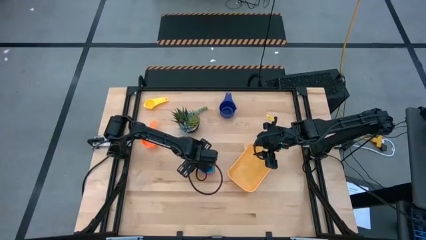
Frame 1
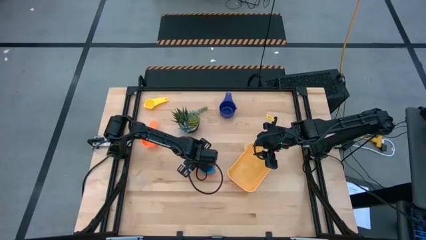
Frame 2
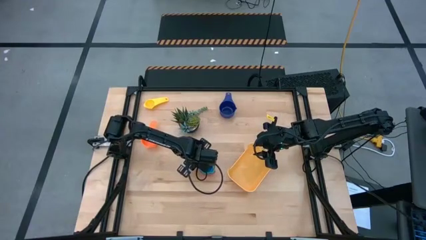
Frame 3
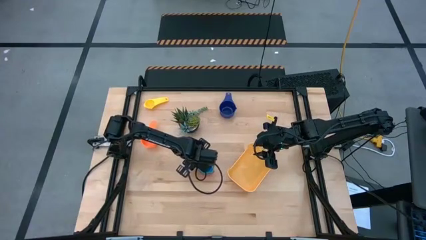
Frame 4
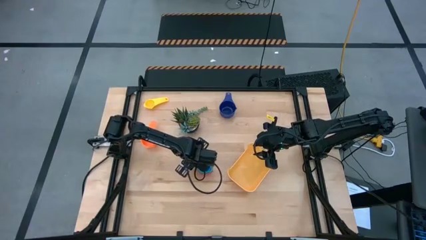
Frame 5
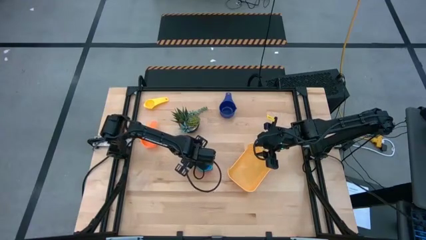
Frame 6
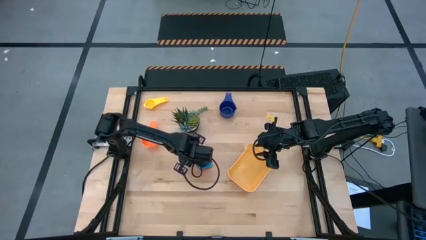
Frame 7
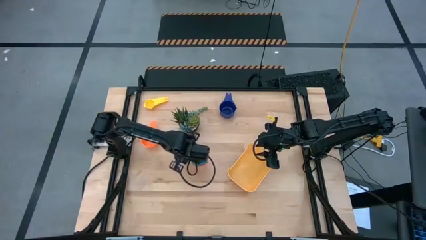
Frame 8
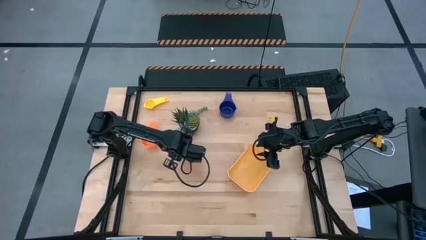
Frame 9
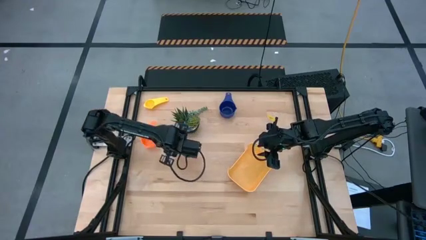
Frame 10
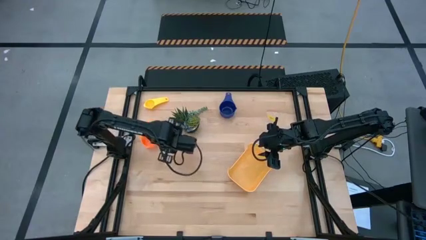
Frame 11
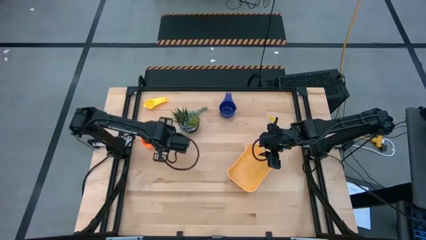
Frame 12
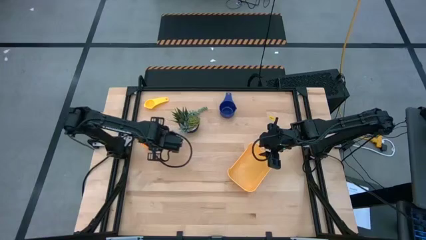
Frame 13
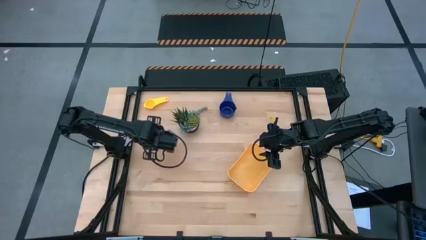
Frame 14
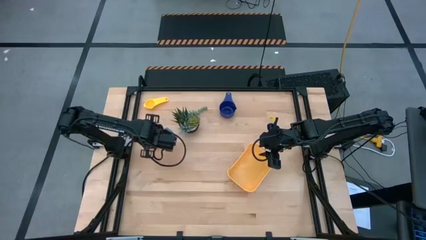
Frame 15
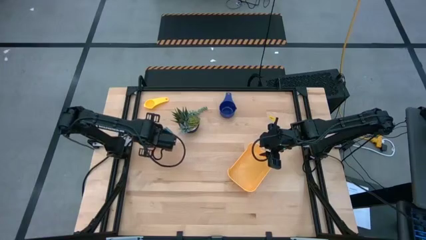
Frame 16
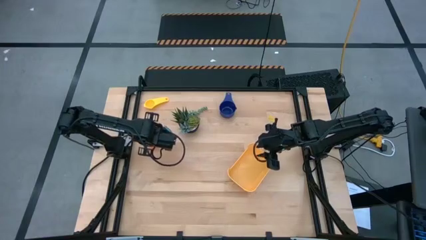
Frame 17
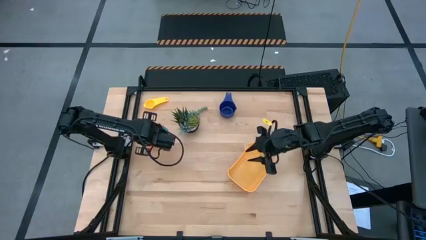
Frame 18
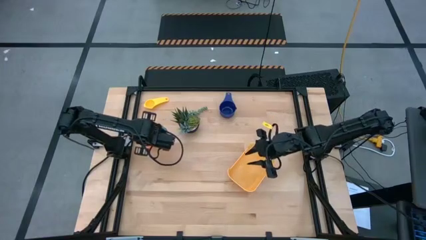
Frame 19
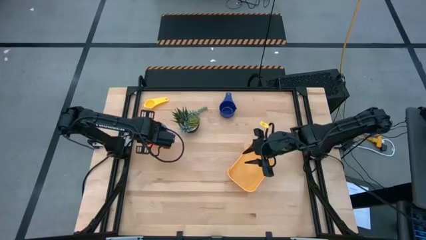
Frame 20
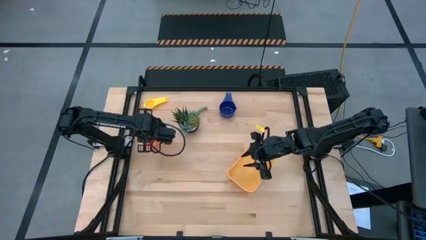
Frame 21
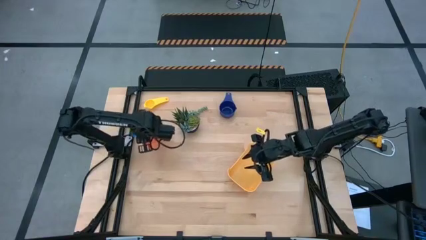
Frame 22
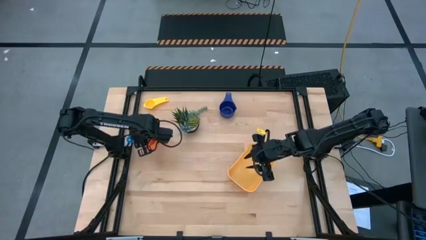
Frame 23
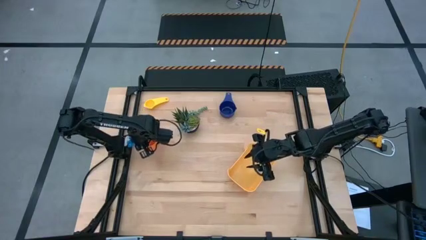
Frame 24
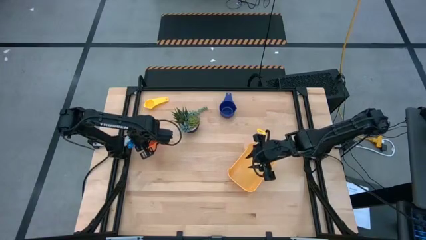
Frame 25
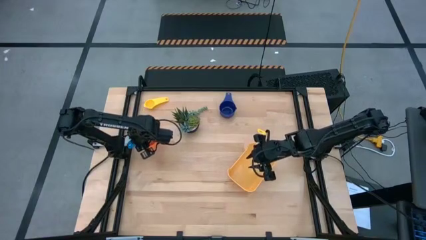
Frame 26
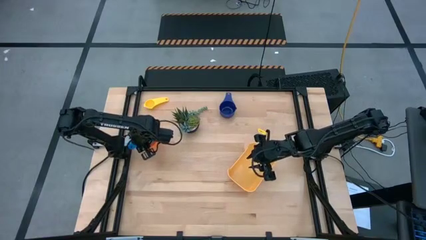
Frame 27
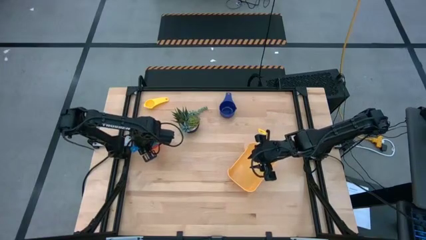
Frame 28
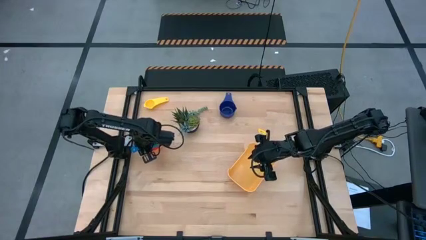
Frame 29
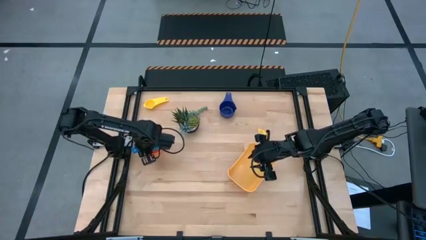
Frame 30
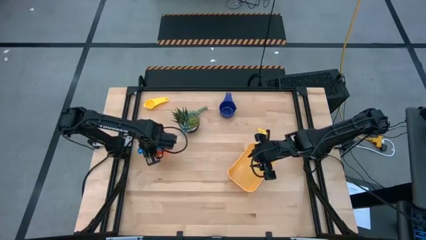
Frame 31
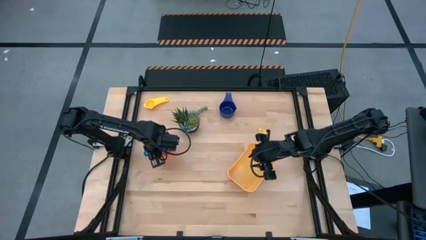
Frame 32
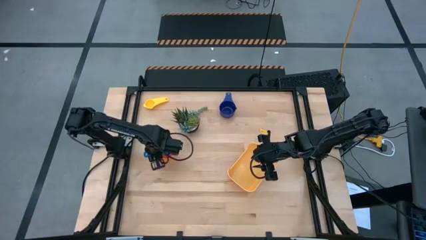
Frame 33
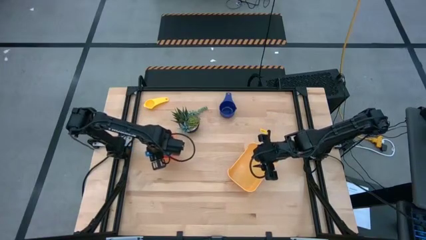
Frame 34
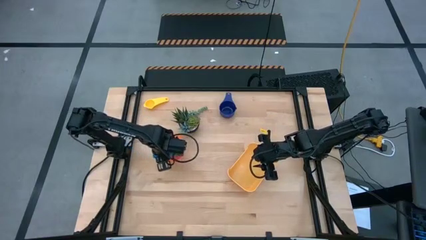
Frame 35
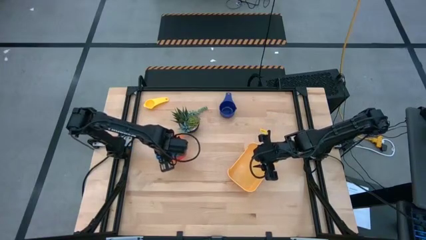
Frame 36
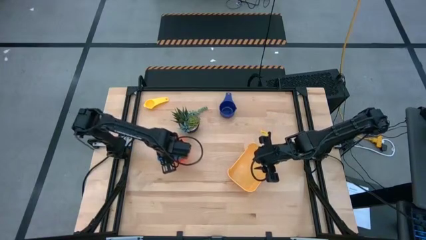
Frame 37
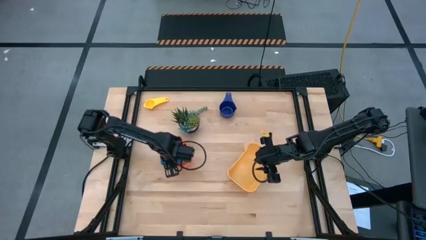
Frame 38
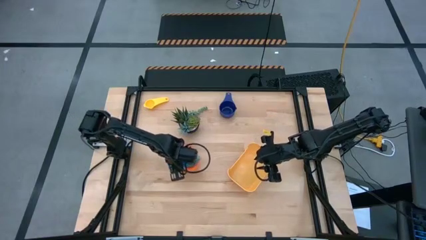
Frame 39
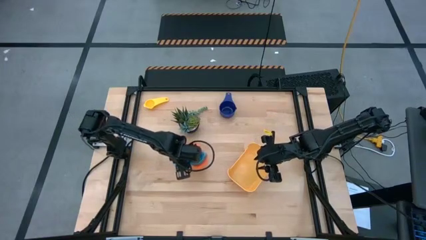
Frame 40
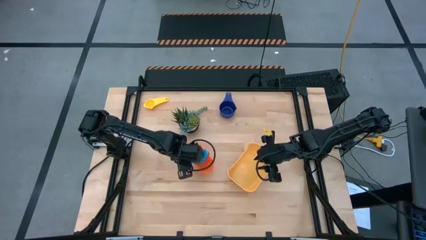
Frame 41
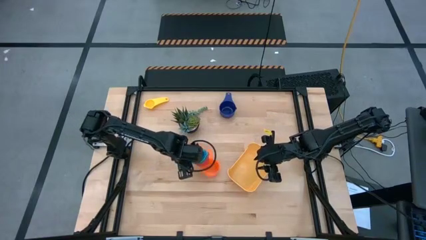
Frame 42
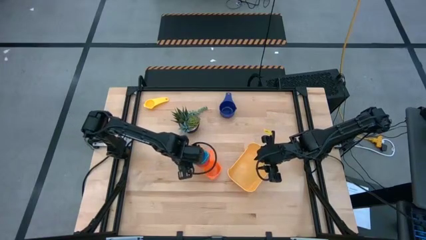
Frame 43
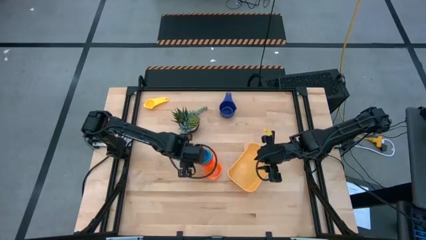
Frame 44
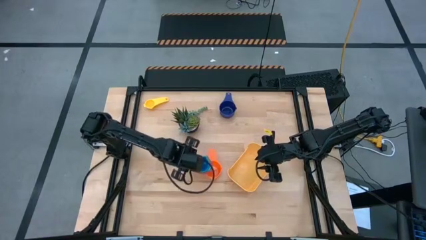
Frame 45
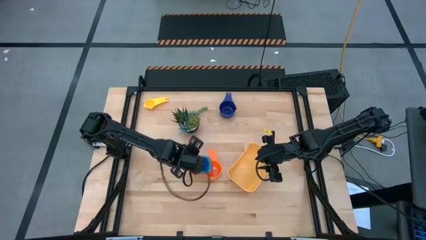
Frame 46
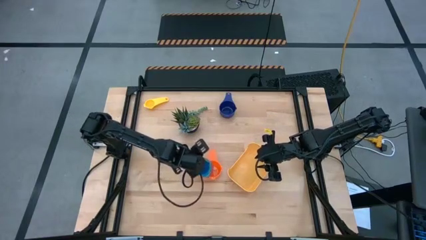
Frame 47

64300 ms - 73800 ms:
Task: Nest measuring cups in basket
Stack the measuring cups on the orange measuring cup

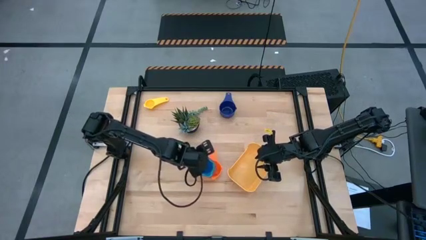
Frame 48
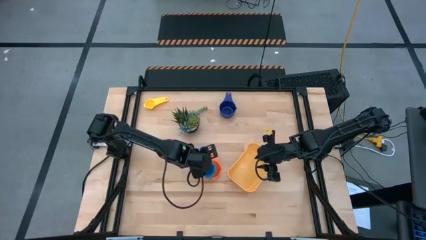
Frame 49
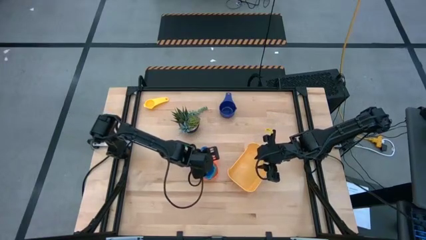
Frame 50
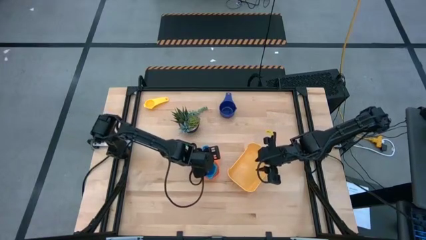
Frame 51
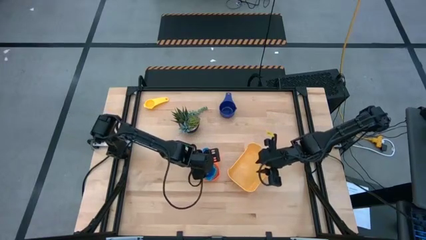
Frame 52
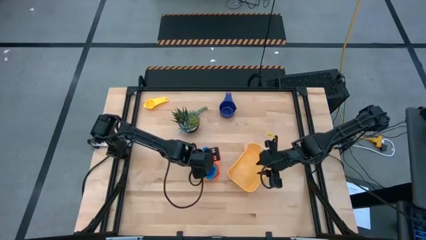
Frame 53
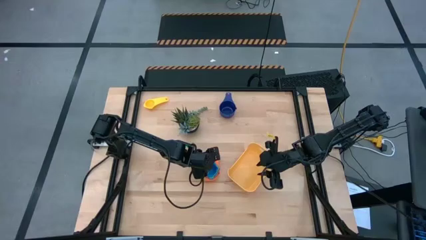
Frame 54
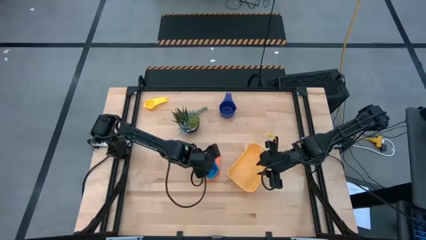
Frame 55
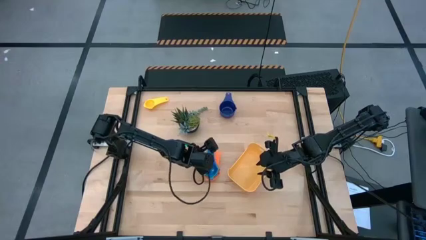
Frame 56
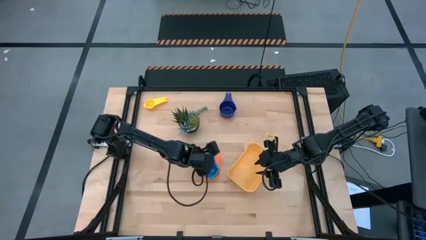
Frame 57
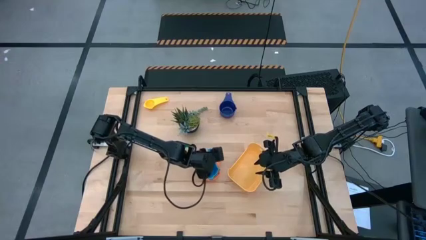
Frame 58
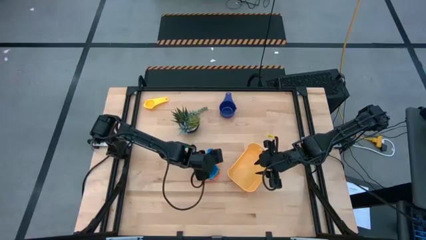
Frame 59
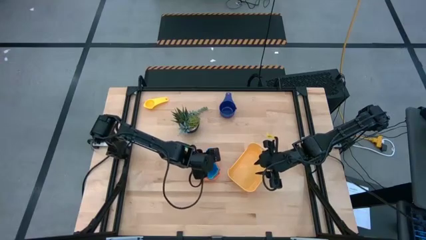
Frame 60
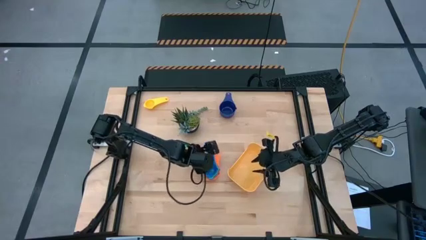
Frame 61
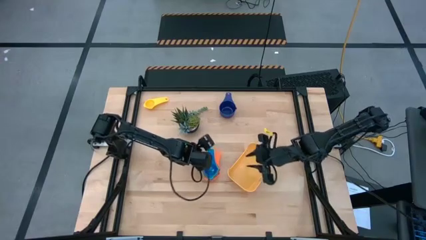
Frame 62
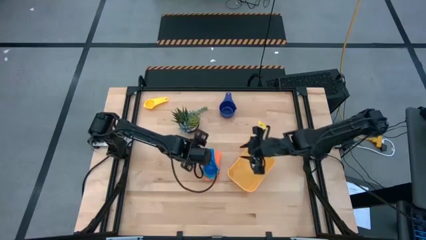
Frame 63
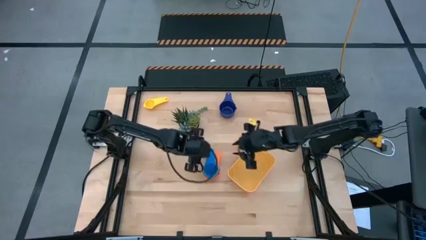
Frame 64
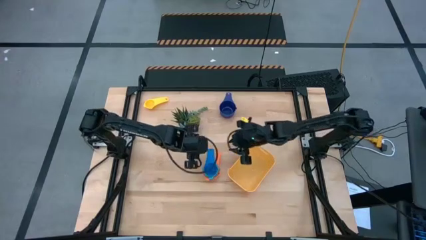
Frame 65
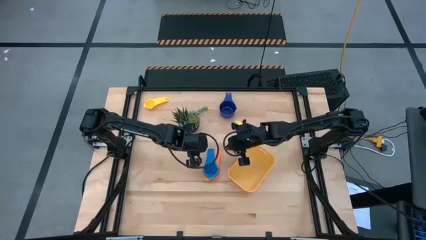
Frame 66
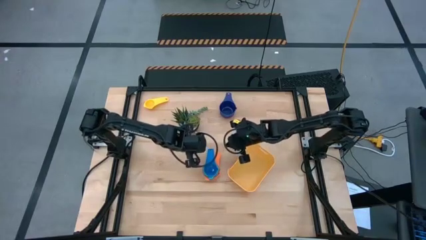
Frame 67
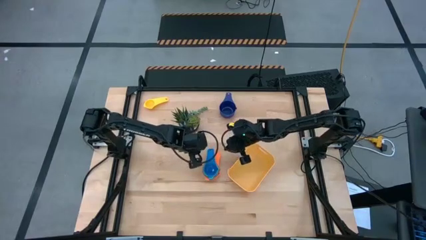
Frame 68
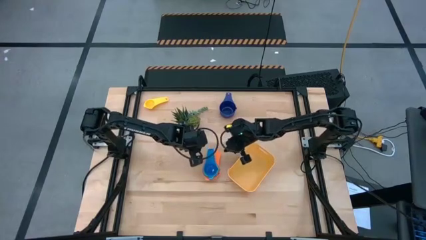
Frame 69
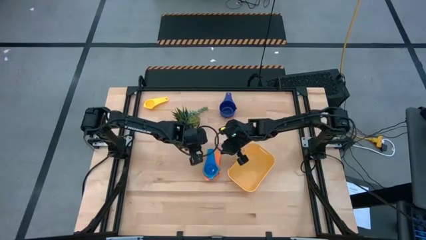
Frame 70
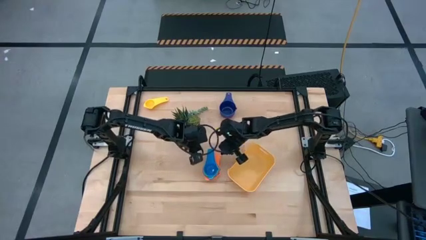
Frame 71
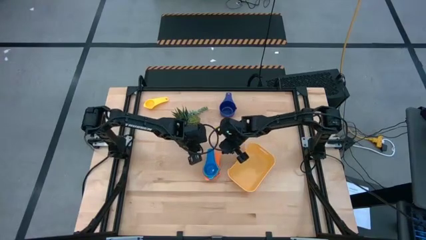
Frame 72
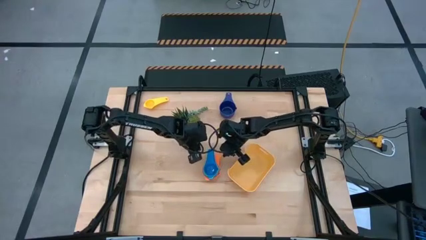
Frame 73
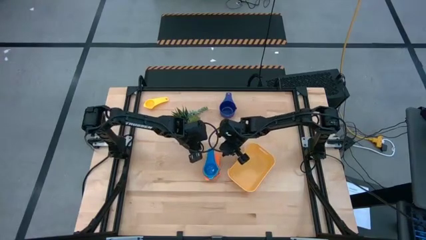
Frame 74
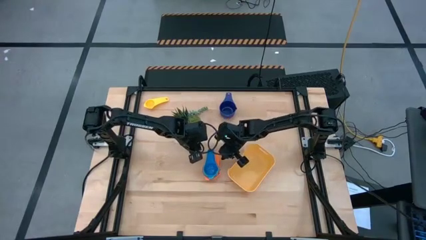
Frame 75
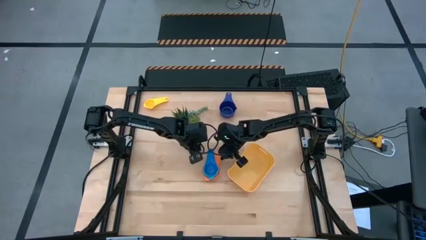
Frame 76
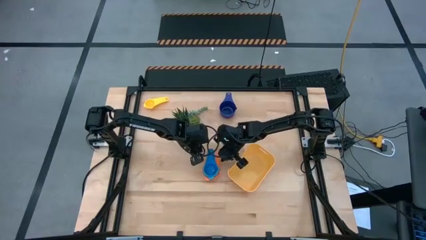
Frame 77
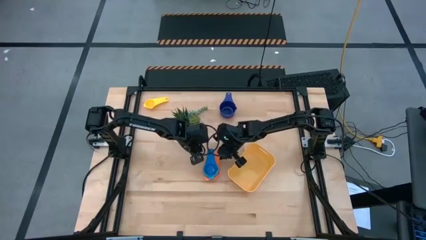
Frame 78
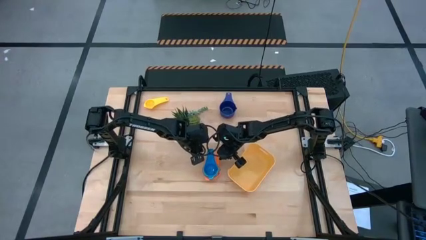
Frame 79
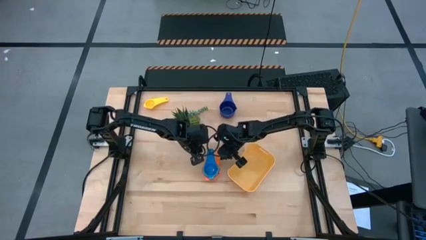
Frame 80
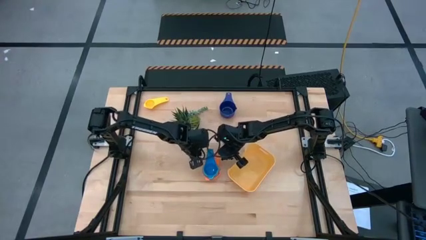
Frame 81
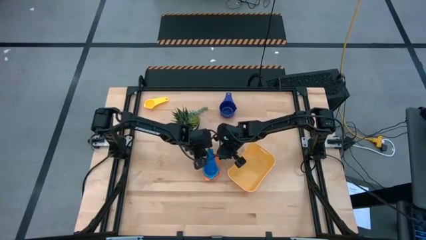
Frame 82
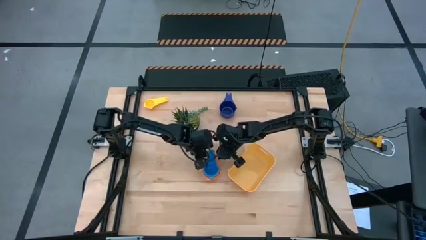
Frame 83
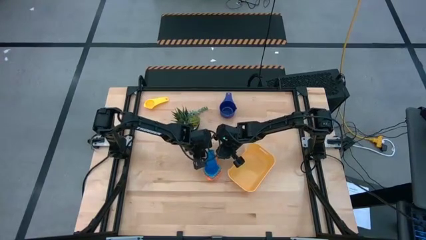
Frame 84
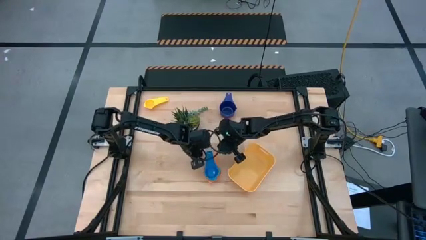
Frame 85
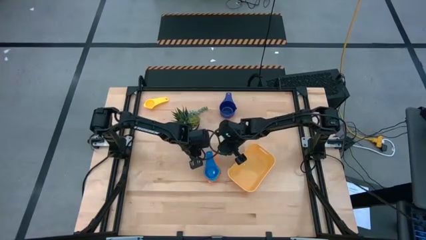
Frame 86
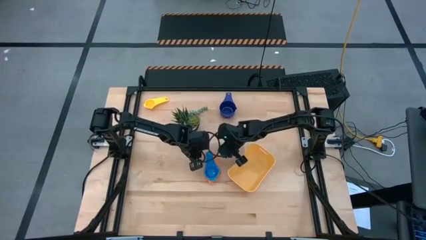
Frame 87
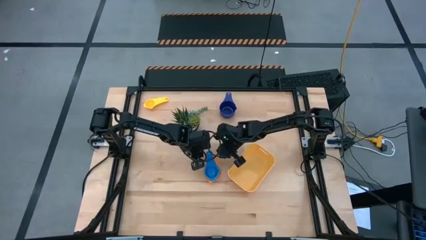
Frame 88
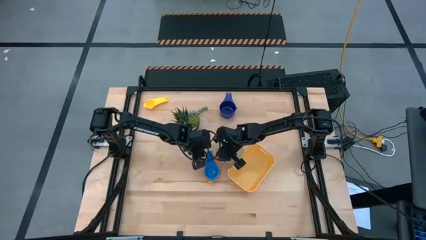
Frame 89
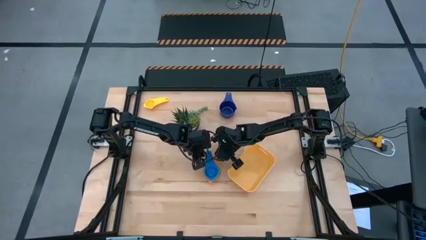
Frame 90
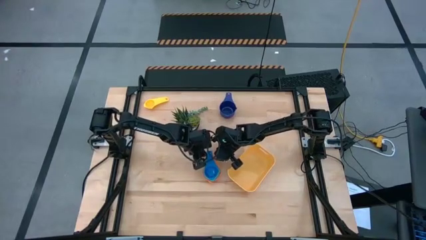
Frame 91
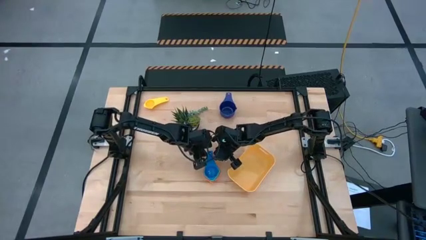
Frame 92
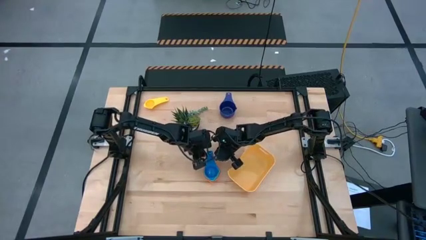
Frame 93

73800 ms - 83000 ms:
Stack the measuring cups on the orange measuring cup
